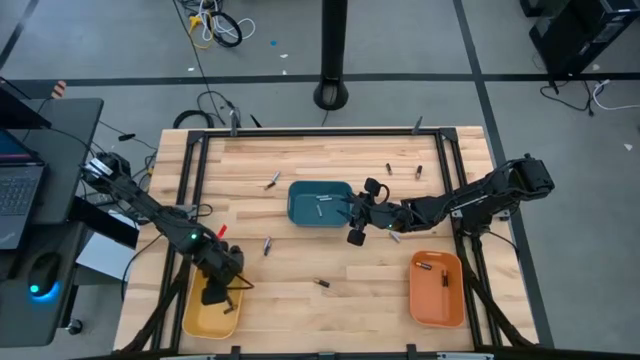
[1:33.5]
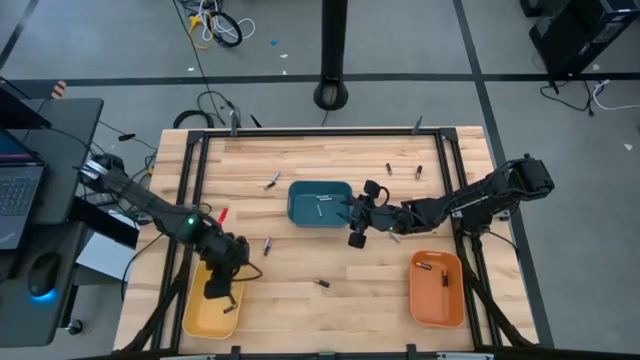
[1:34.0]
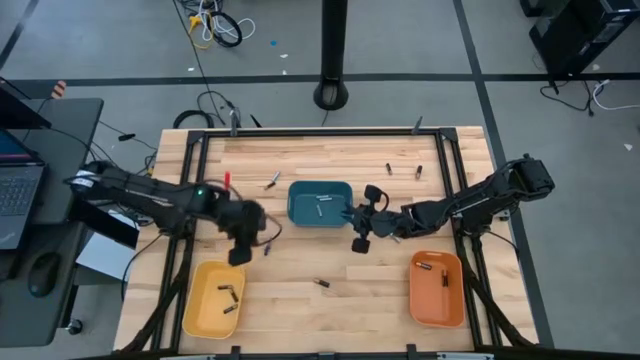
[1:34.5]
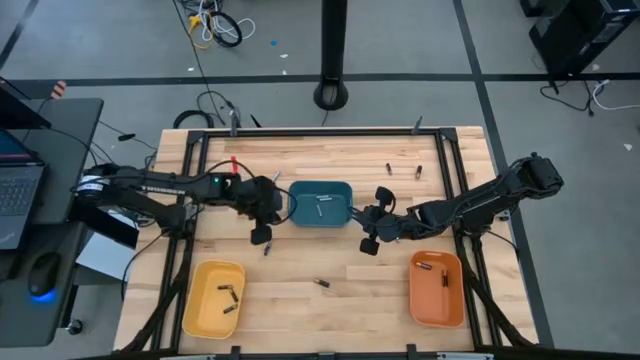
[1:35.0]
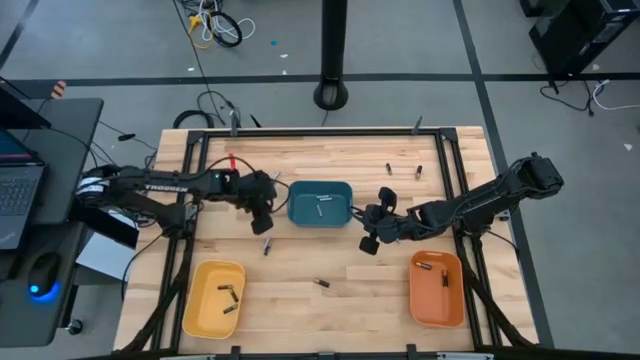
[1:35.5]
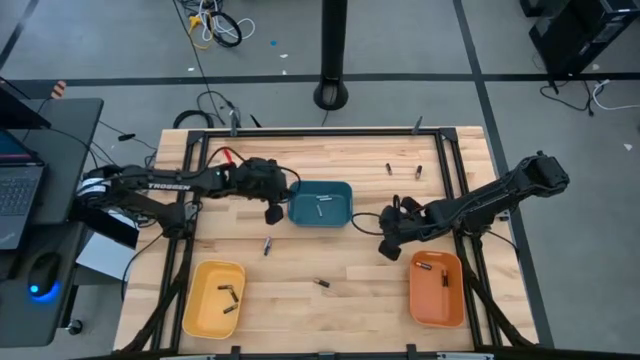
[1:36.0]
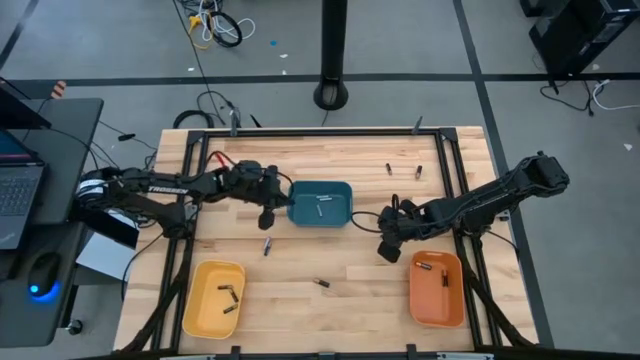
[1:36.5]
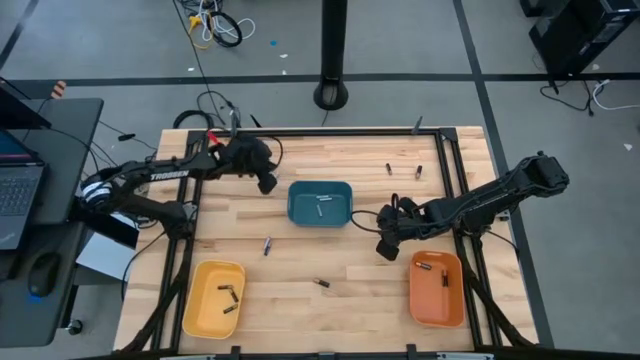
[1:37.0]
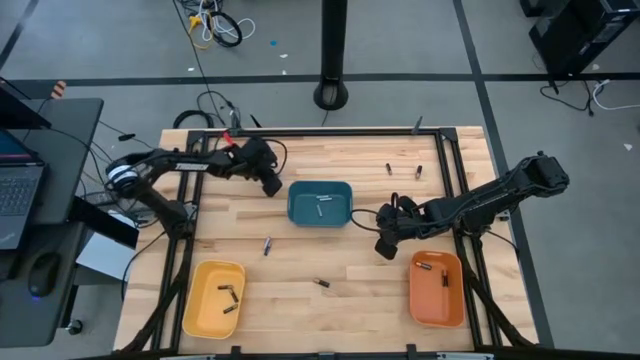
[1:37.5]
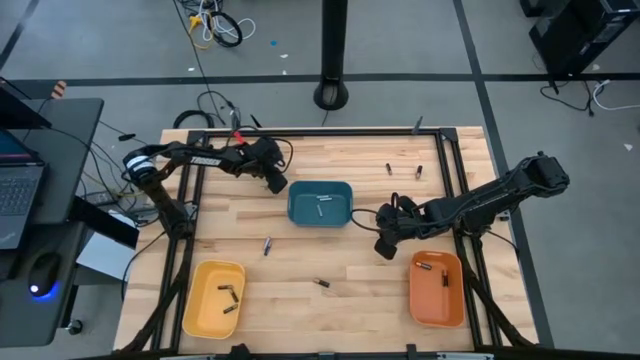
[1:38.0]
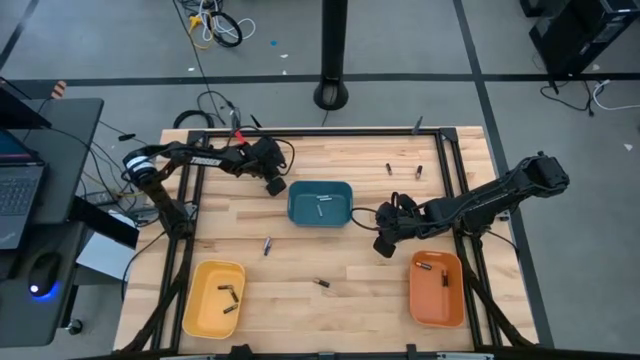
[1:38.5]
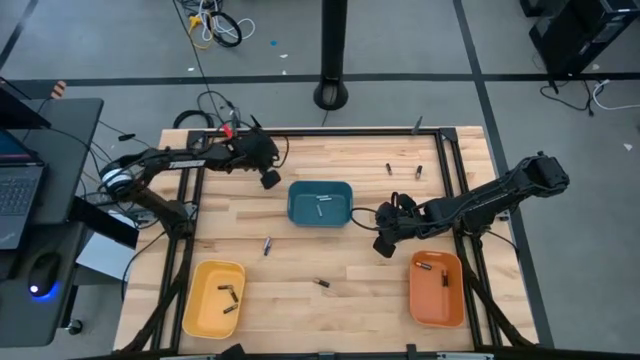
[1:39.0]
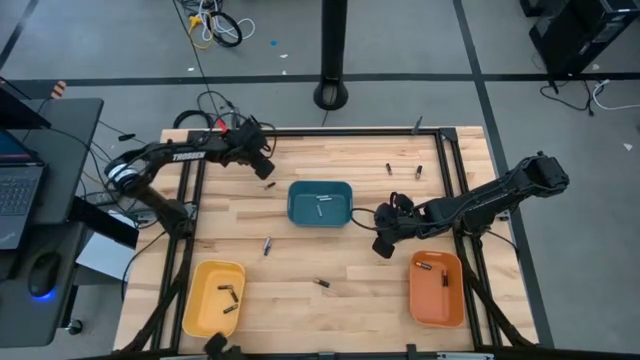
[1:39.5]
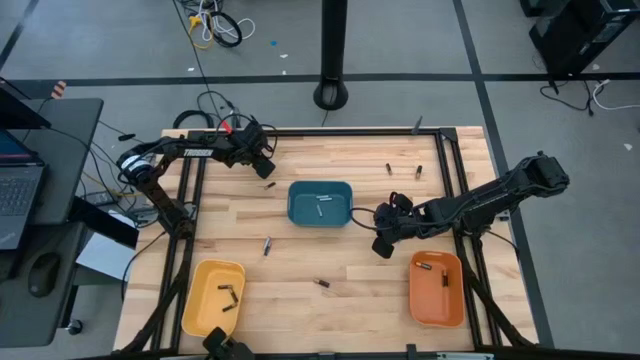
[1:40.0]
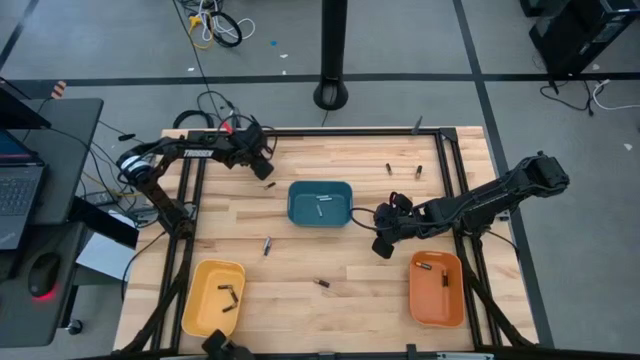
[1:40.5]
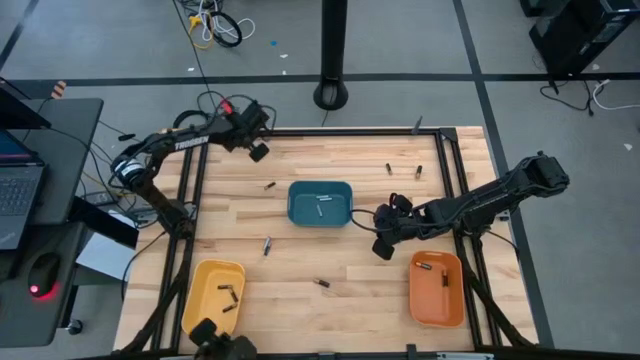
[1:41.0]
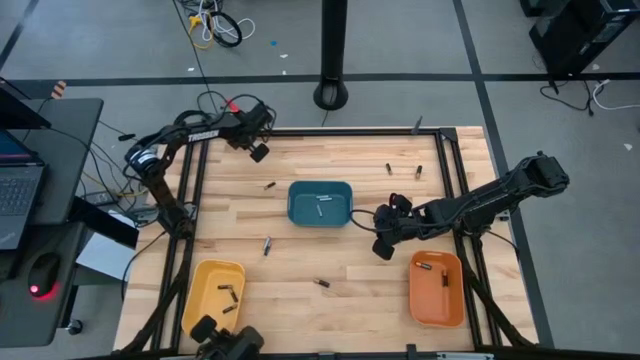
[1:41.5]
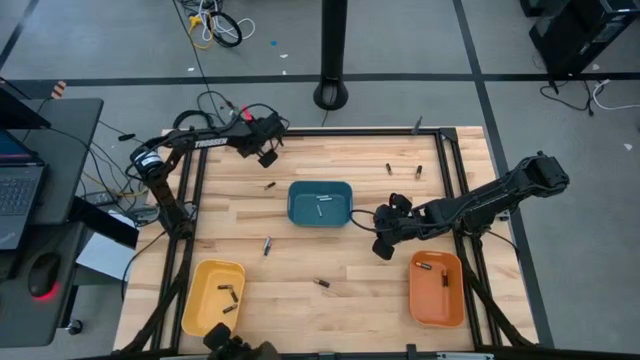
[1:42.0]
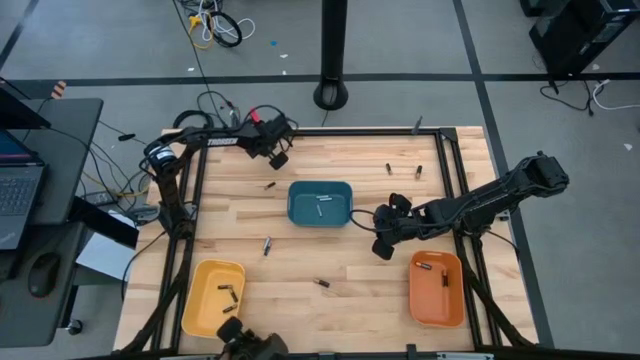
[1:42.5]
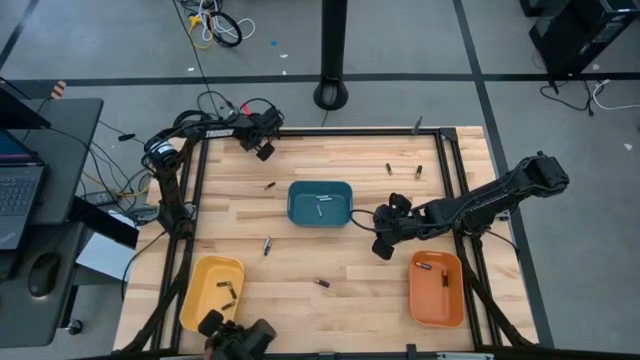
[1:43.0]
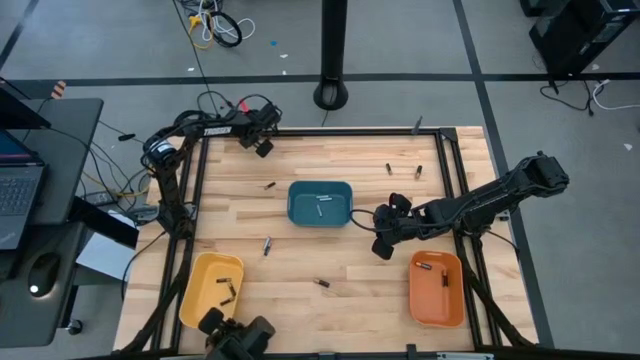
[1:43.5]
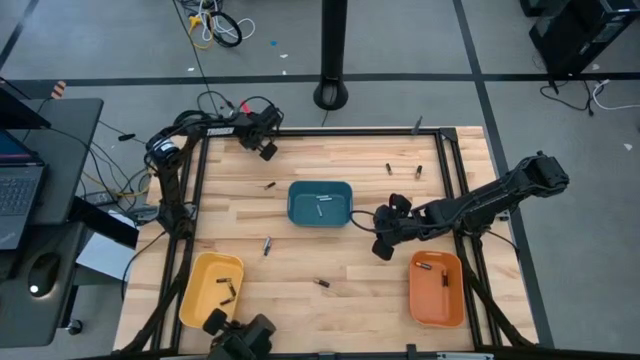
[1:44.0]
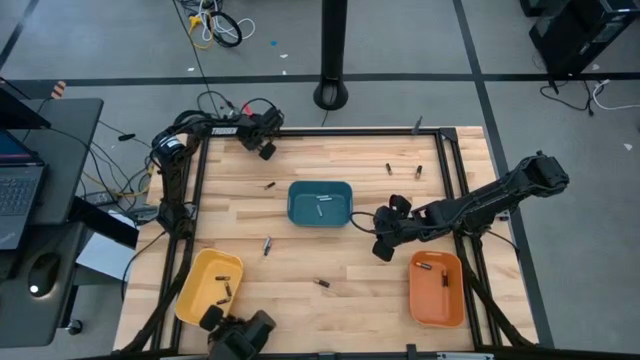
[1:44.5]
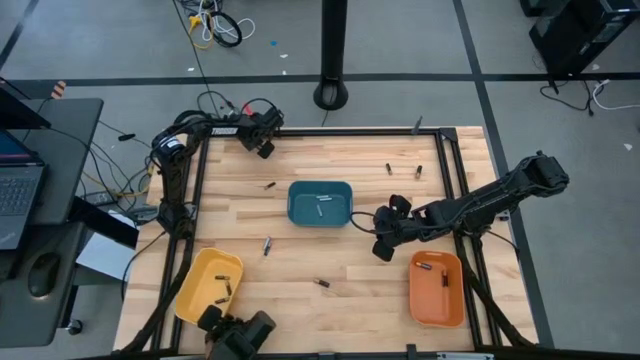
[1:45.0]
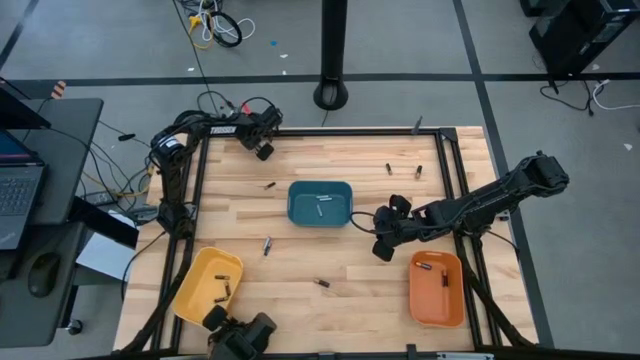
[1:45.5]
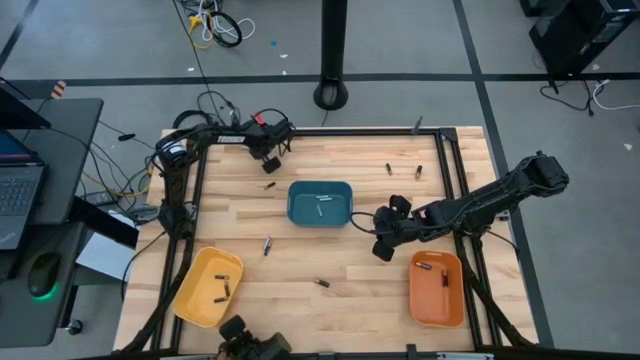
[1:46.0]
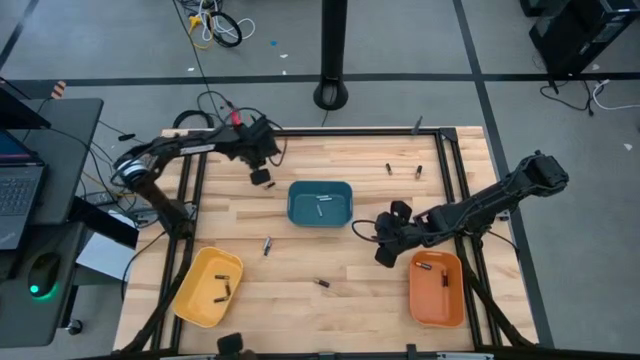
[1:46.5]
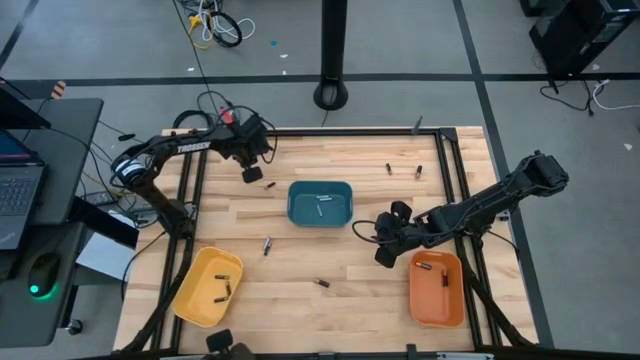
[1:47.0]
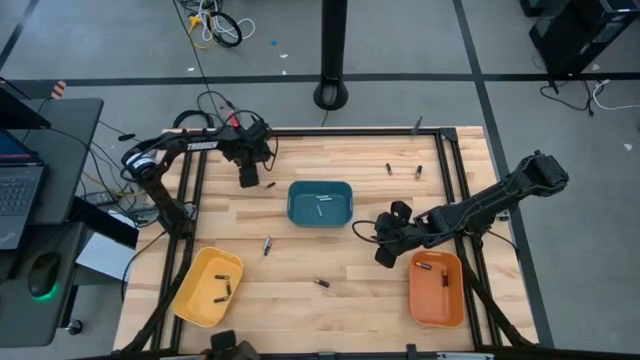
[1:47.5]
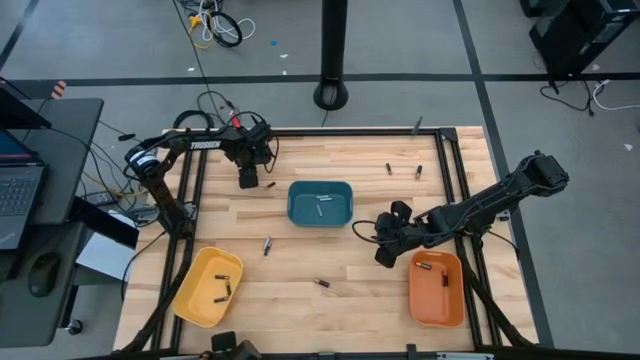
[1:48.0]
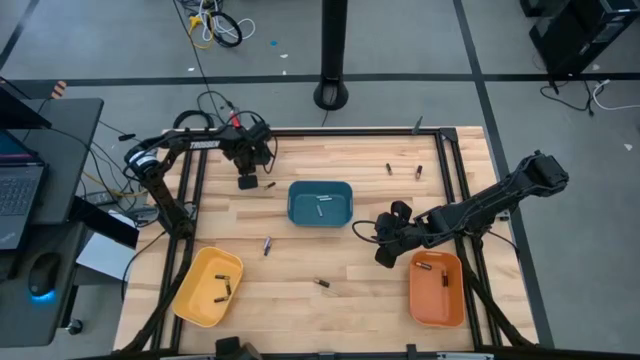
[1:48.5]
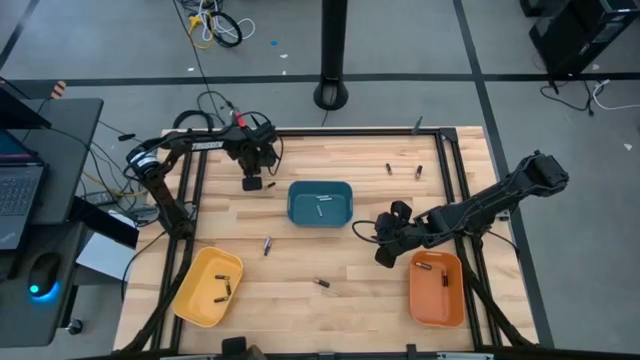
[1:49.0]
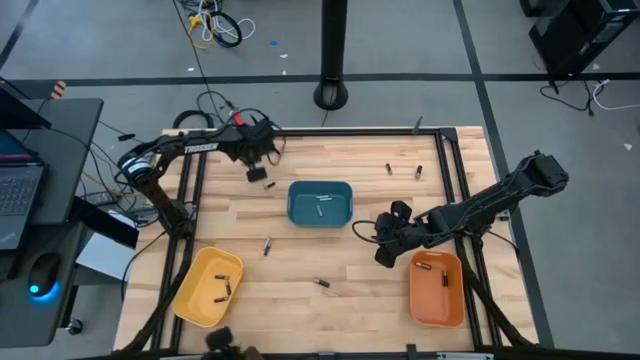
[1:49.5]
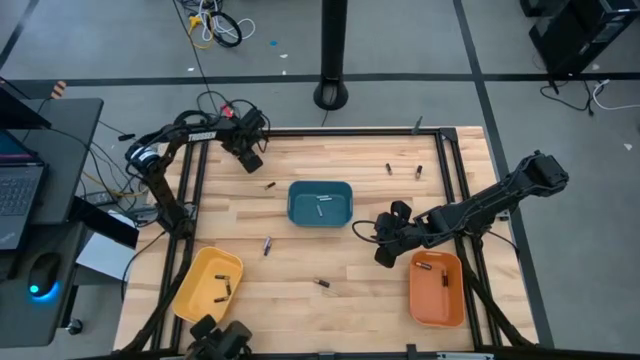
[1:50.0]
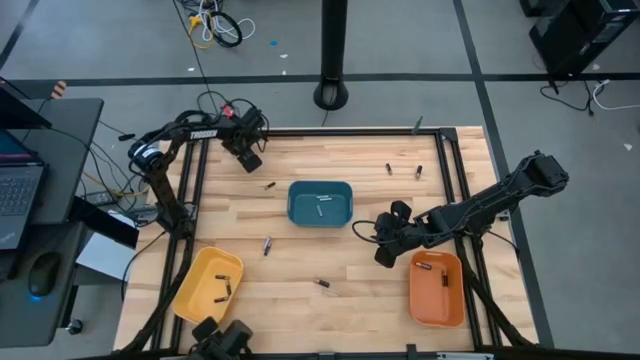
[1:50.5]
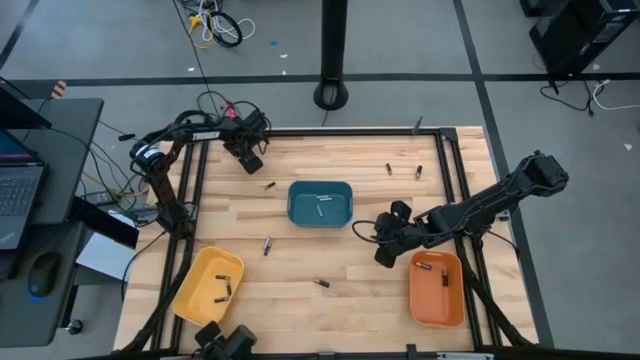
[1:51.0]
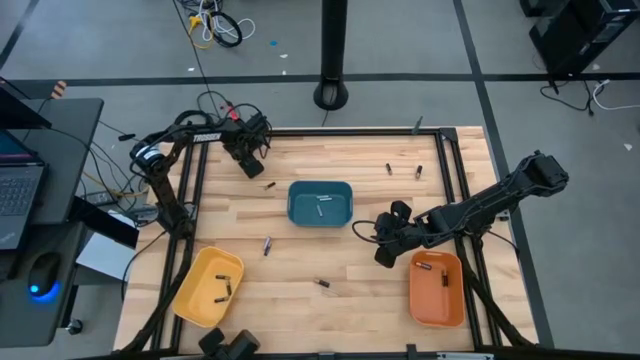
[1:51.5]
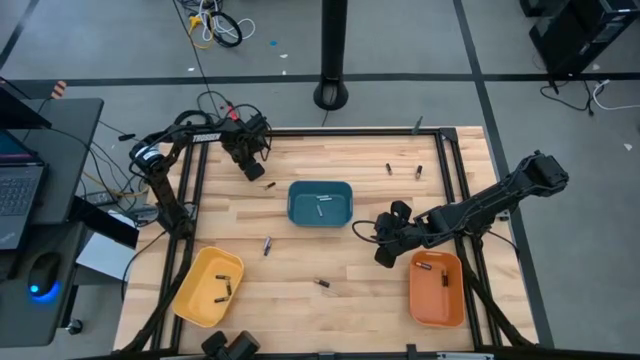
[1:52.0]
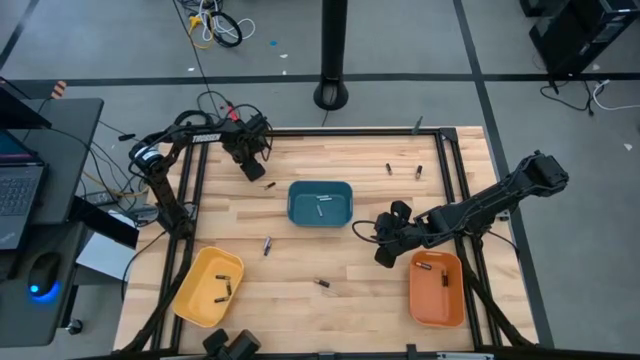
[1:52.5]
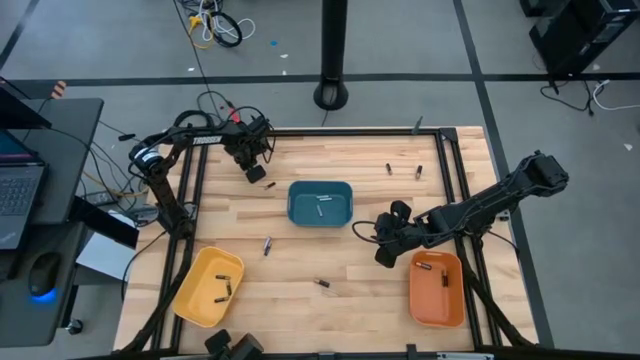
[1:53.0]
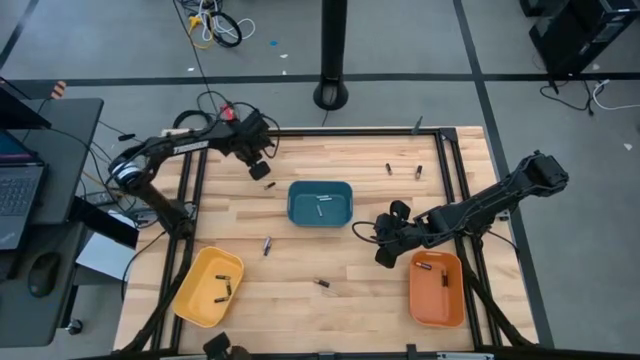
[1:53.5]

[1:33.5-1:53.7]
Task: Sort batteries
Put the silver battery into the blue bin

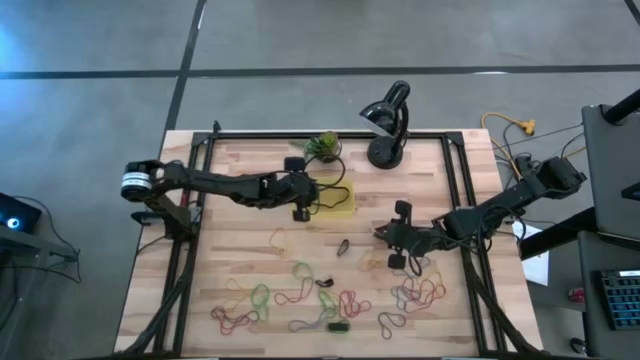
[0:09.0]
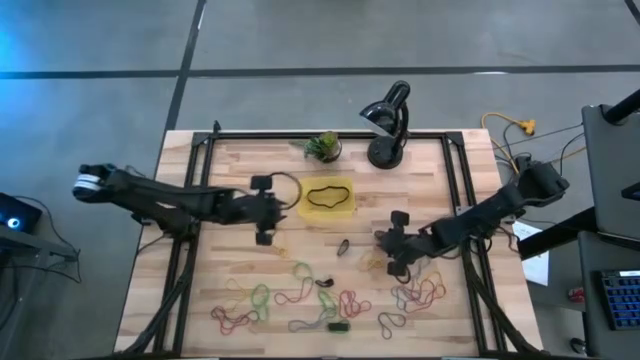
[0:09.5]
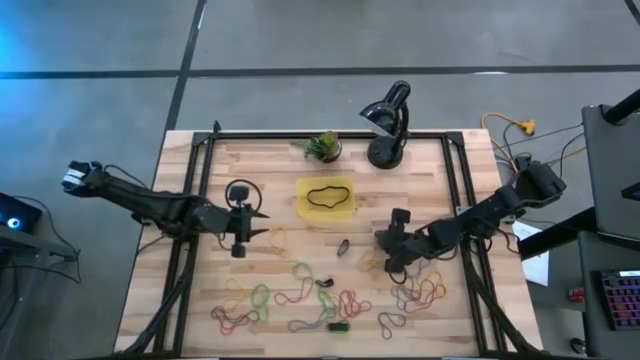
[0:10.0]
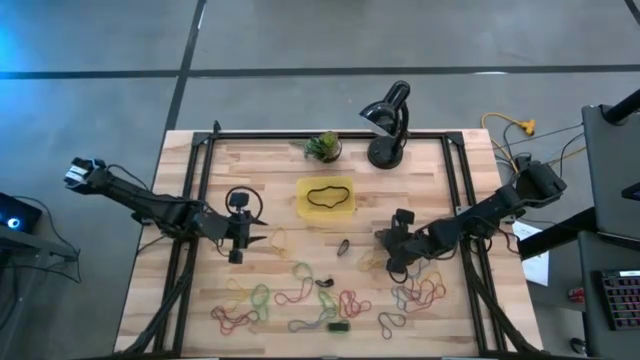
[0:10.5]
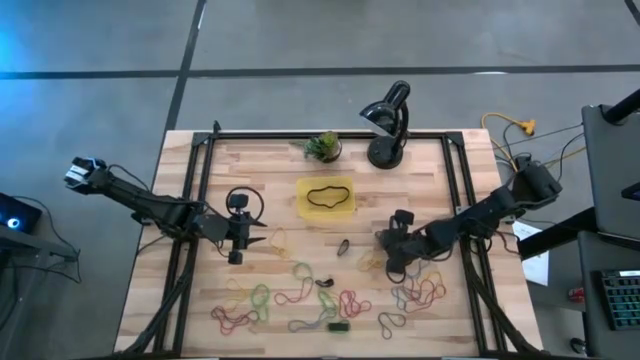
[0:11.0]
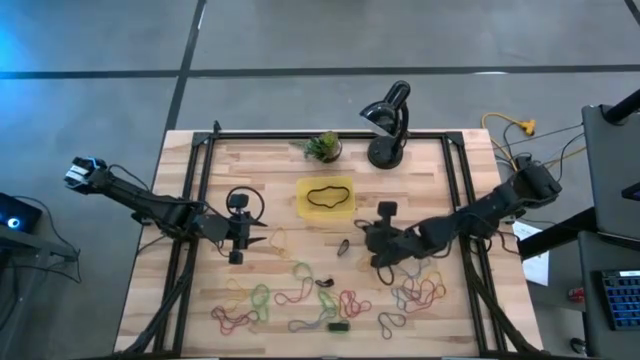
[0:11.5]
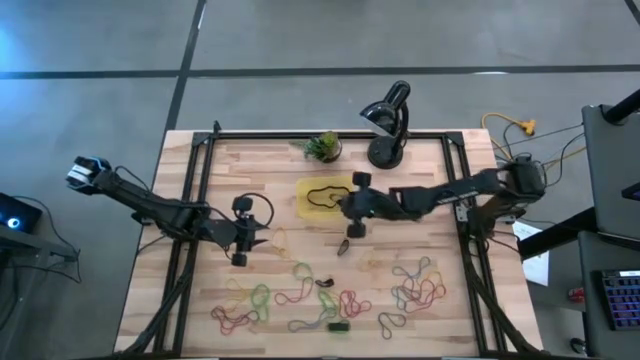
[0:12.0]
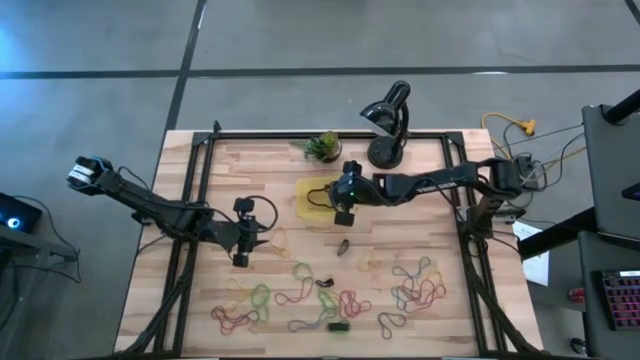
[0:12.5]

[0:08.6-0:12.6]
Task: Pick and place rubber bands into bin
Put the black rubber band in the yellow bin
